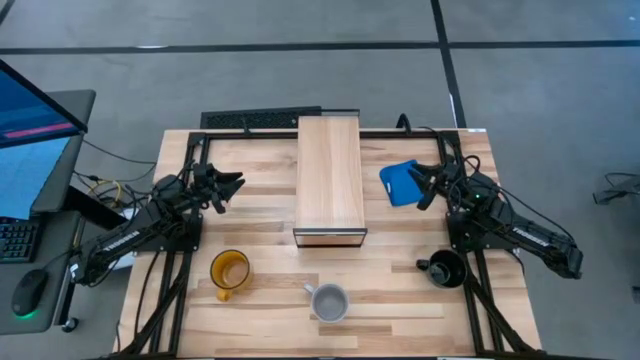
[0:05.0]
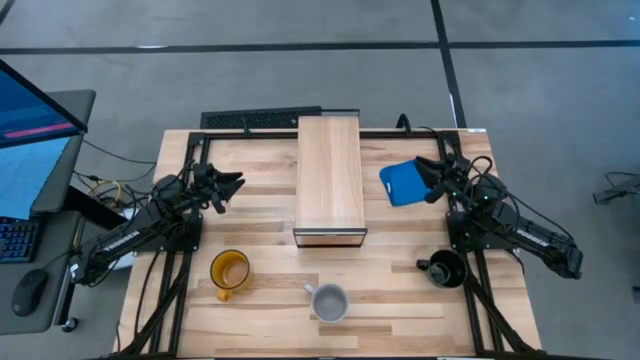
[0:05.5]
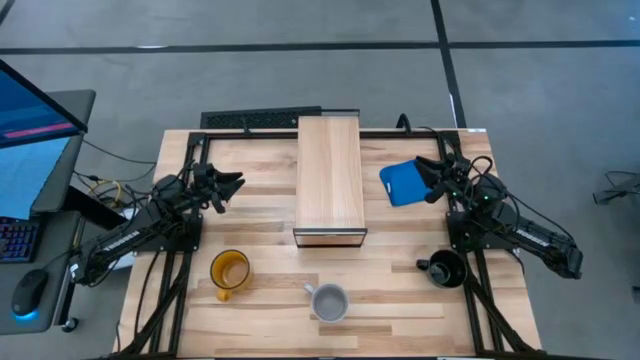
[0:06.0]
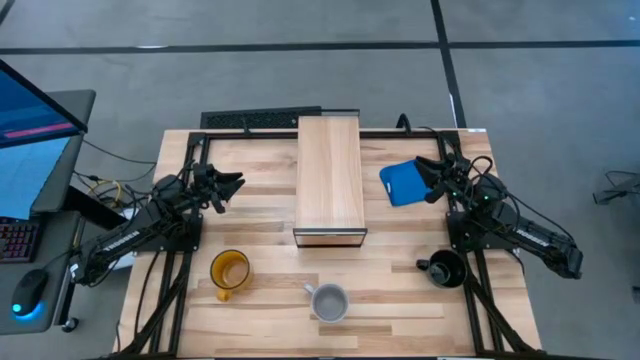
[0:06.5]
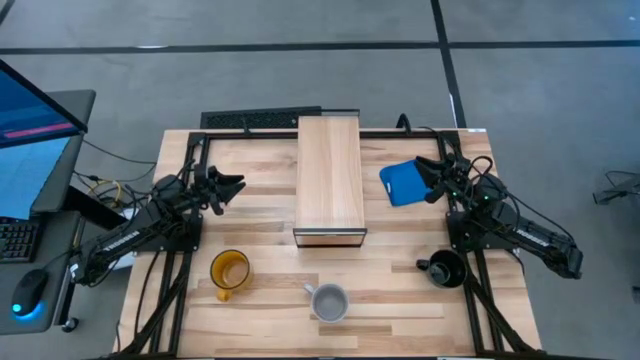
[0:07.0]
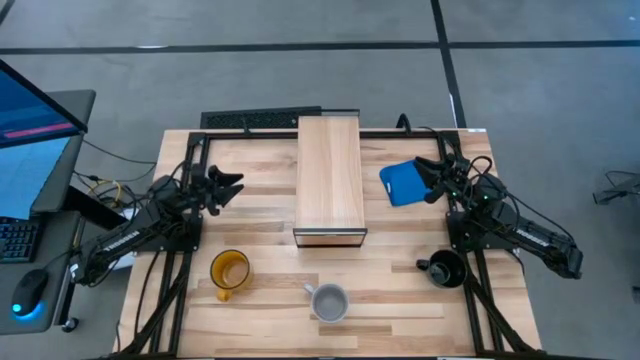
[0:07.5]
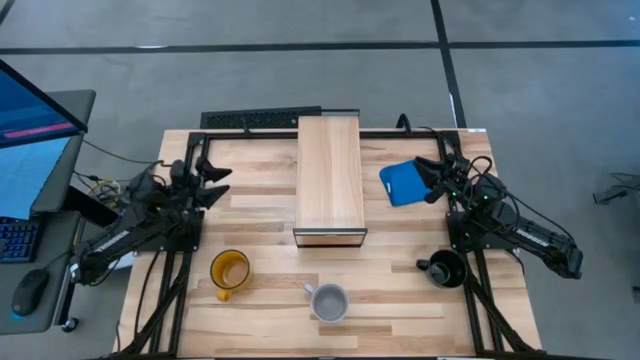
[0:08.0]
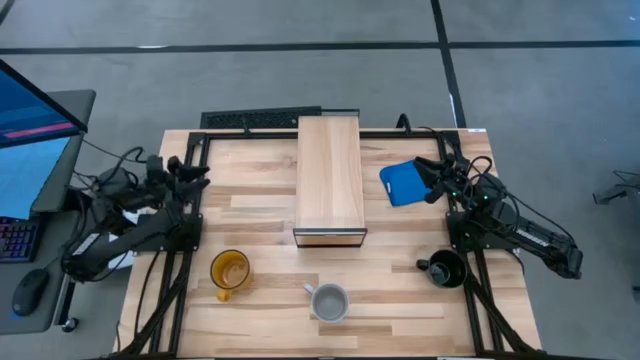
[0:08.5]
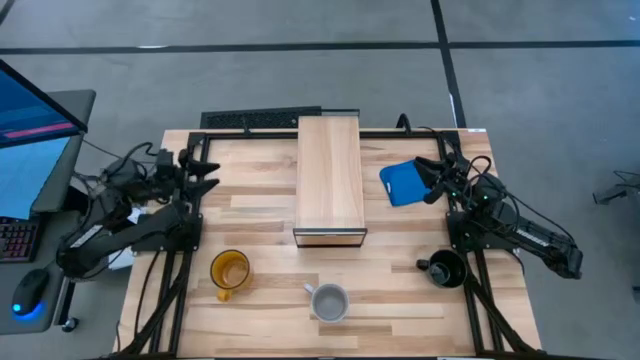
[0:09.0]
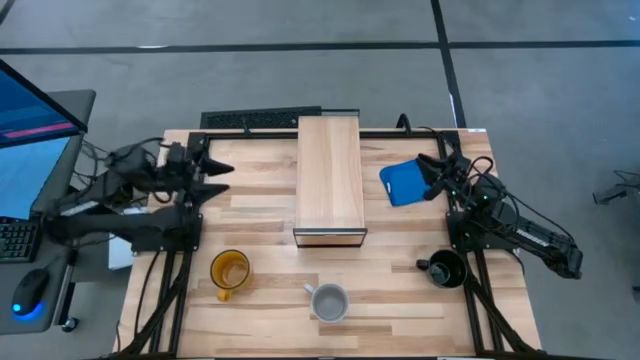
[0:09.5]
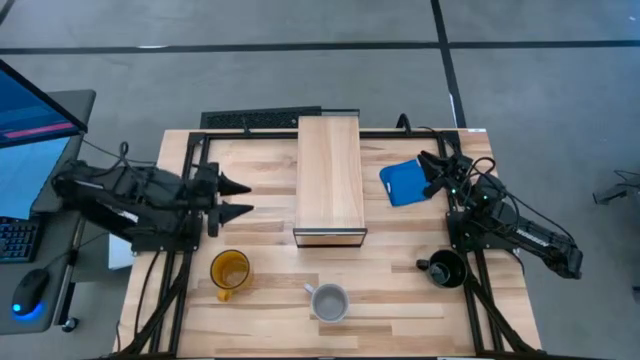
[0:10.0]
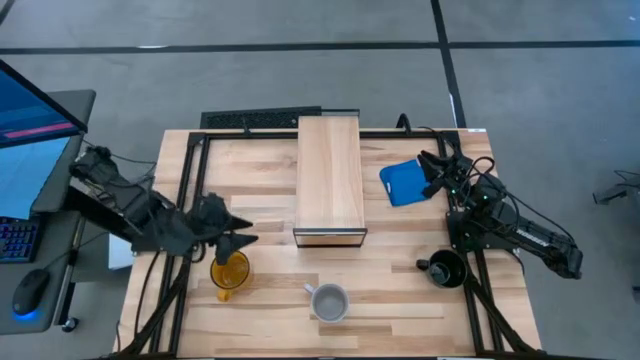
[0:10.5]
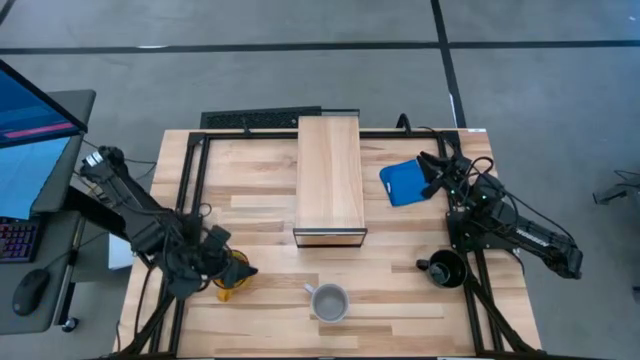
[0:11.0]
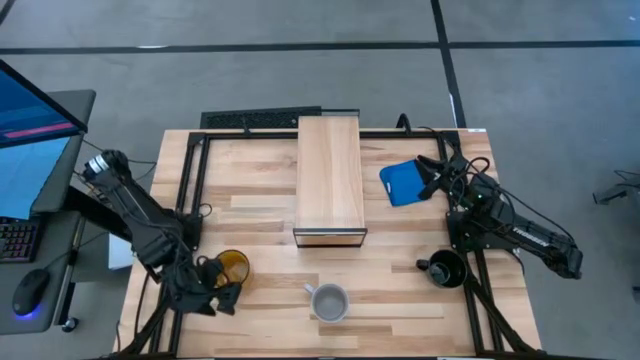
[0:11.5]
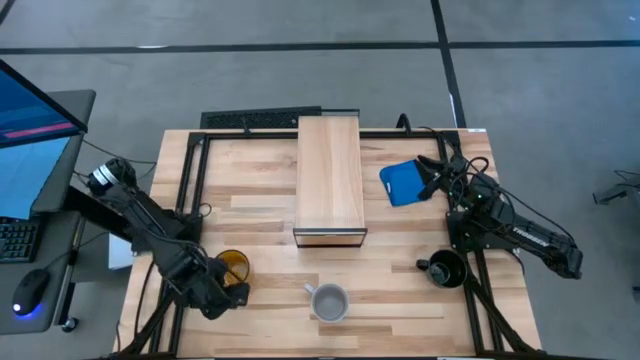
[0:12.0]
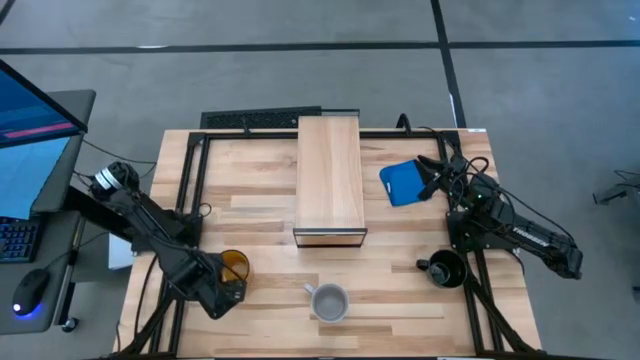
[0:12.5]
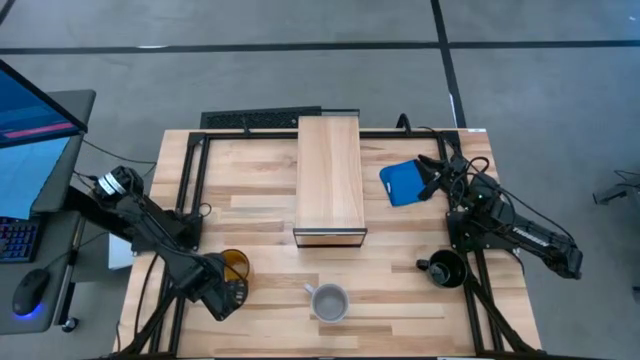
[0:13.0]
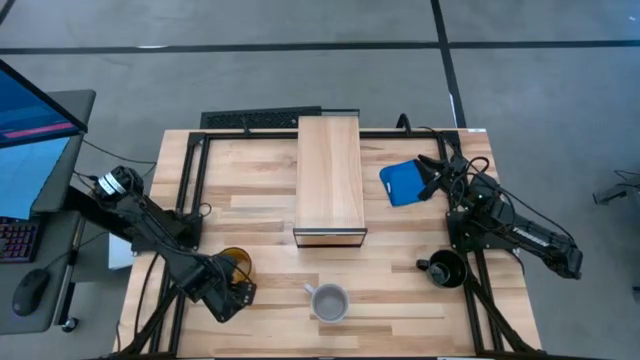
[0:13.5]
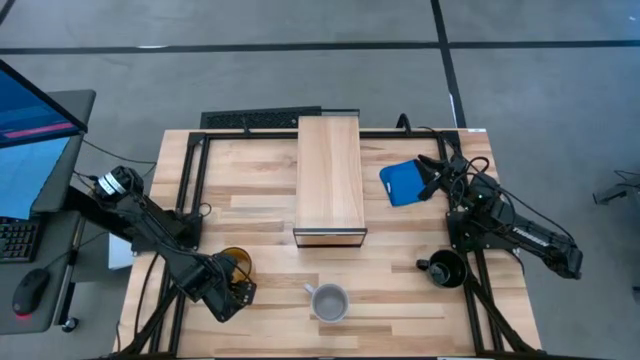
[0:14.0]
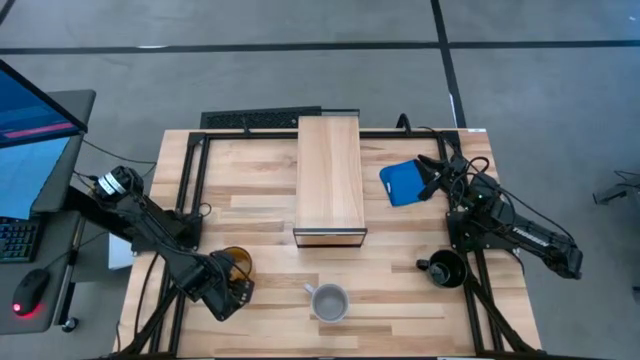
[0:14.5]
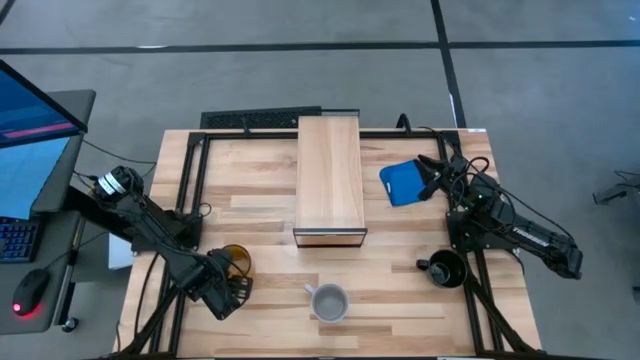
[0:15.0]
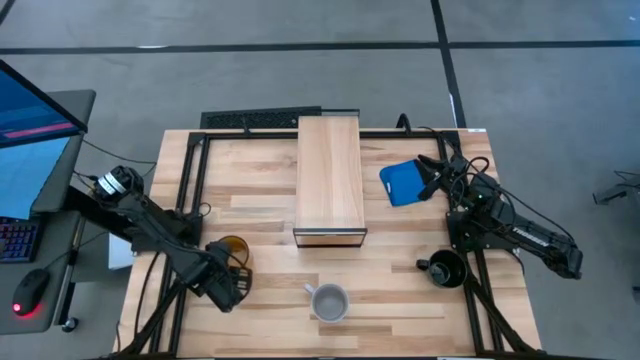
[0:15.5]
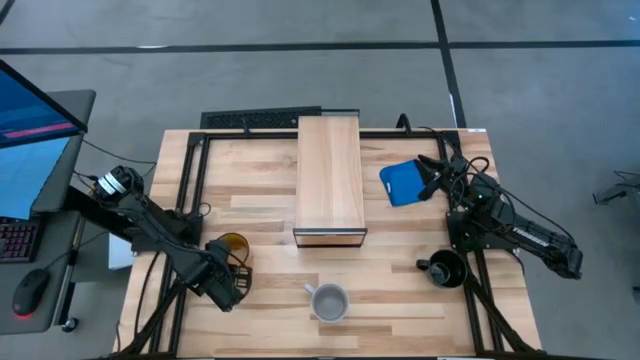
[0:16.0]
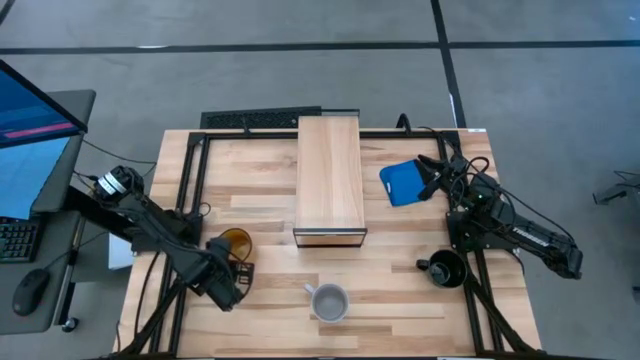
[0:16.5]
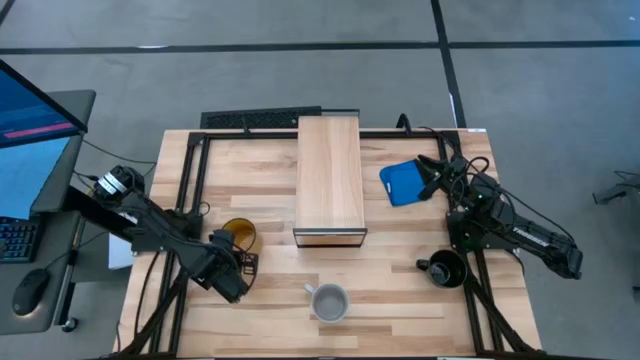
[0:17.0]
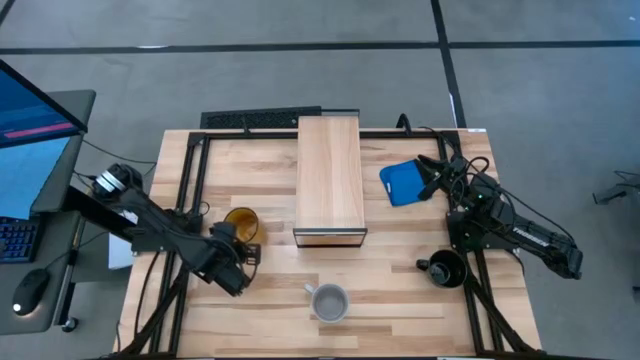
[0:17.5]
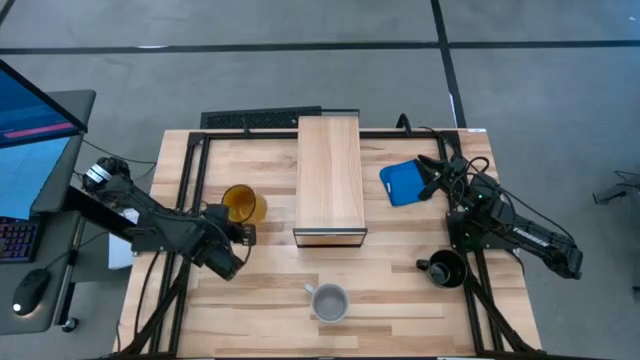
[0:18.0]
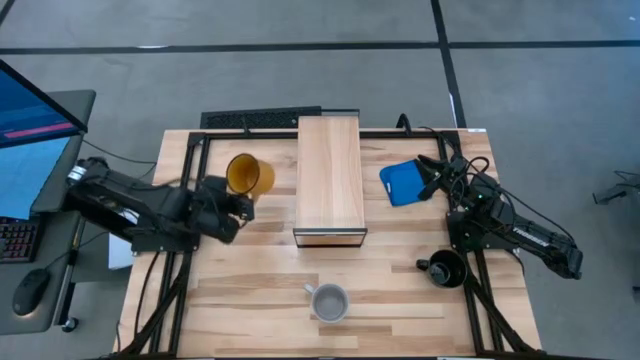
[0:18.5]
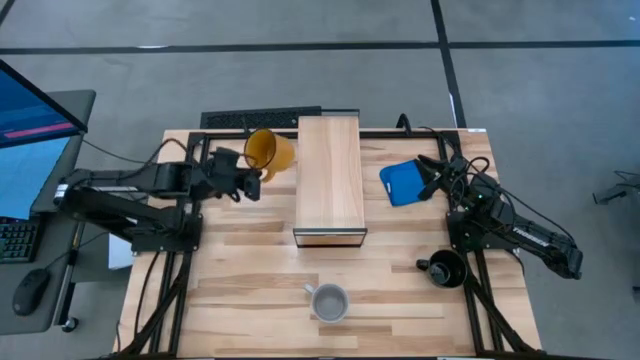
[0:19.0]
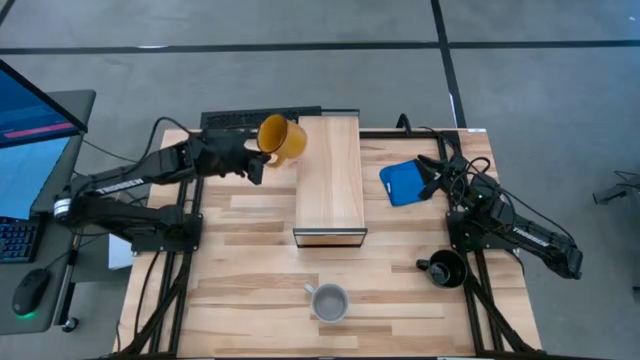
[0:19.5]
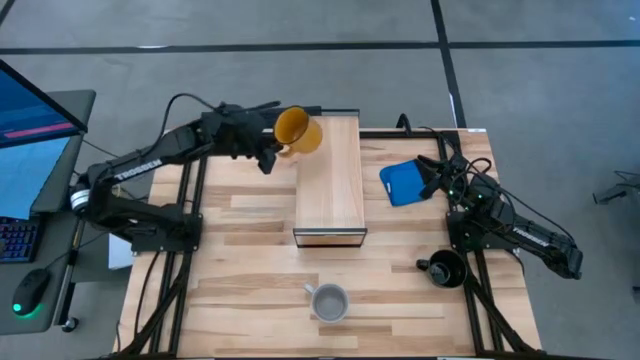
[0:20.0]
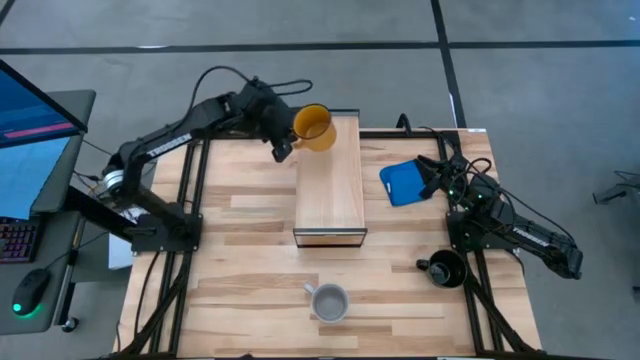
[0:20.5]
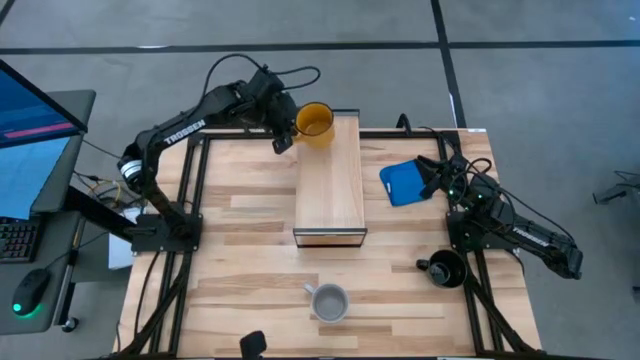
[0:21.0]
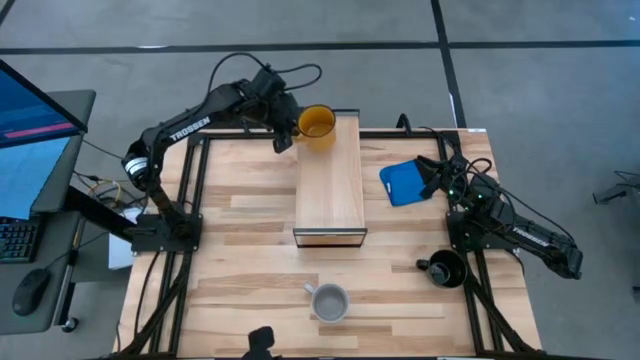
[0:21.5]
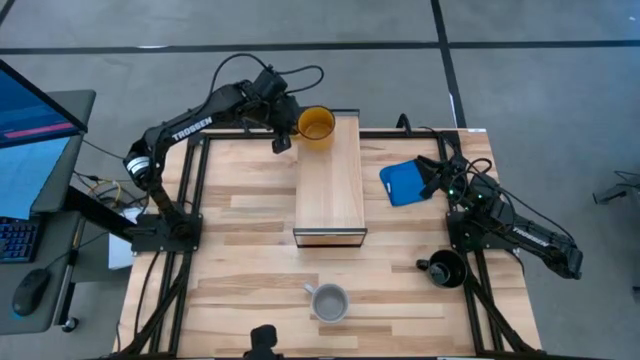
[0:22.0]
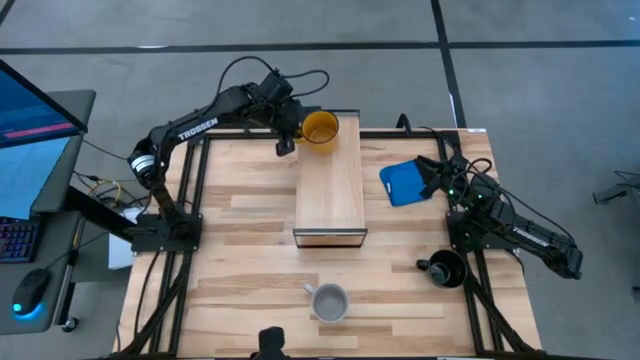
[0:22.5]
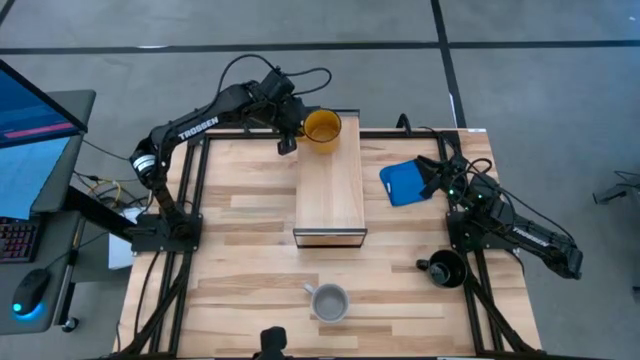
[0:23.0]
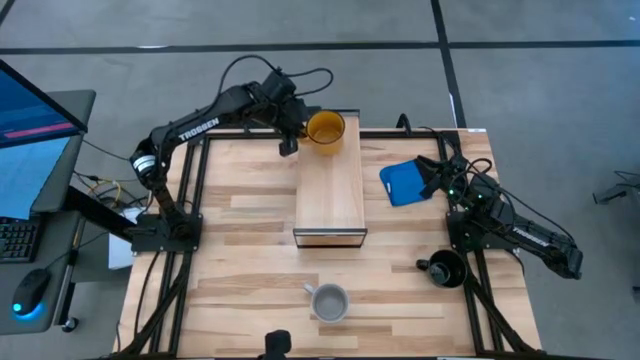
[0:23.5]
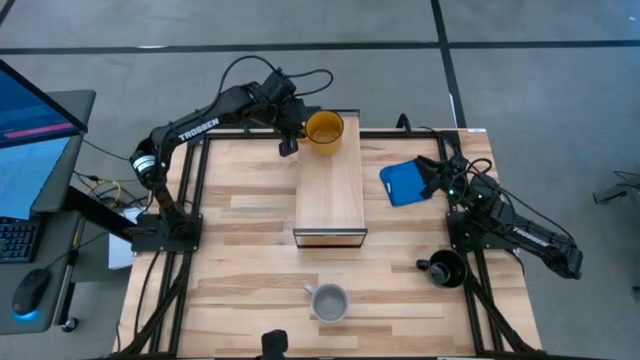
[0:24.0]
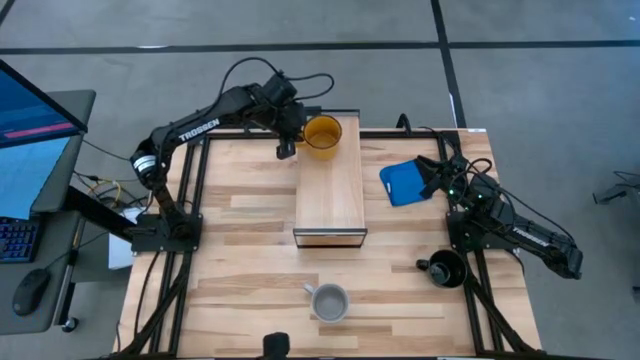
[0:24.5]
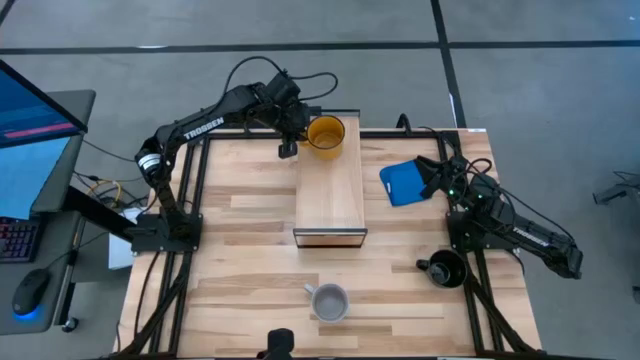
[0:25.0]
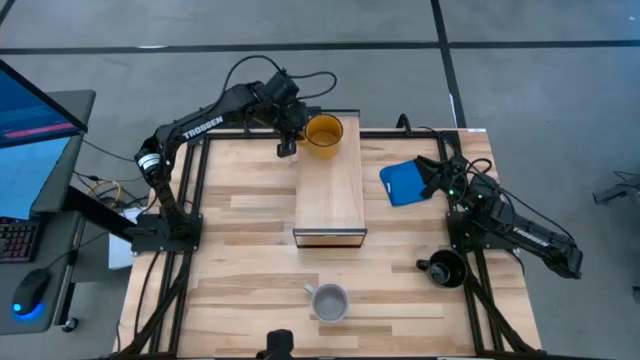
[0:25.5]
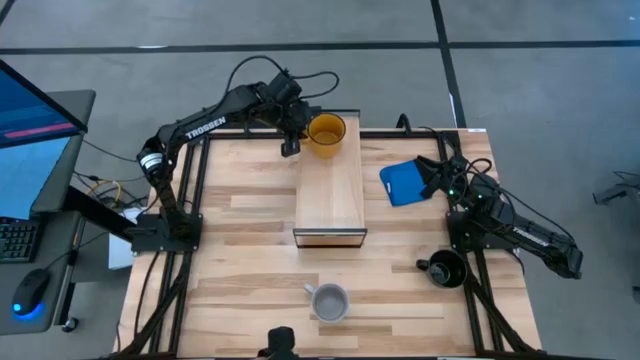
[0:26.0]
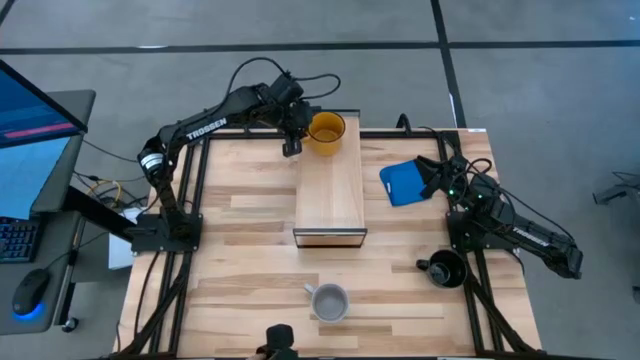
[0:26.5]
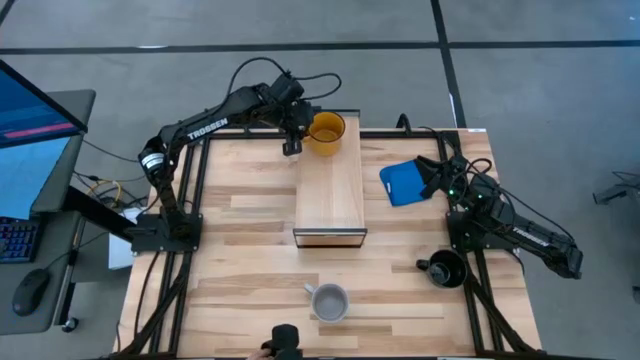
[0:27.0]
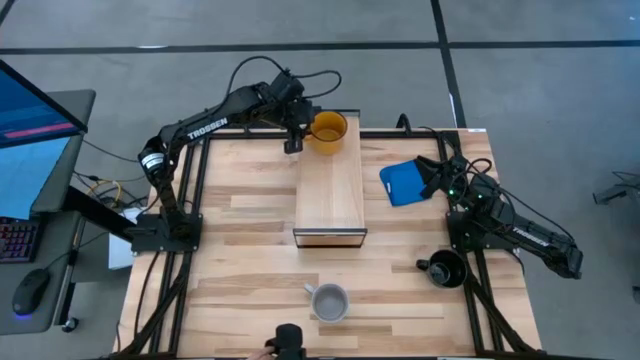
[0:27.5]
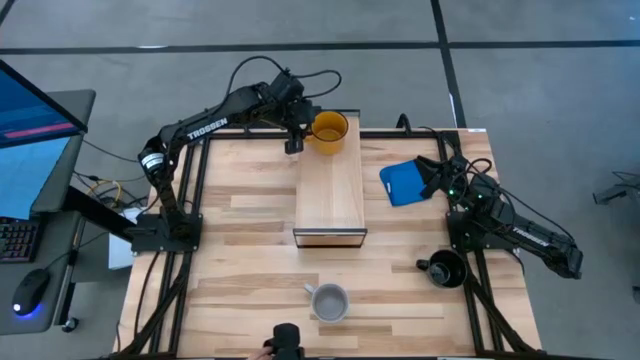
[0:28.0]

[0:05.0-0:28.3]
Task: Stack small to large cups/mugs on shelf
Put the yellow mug on the shelf
